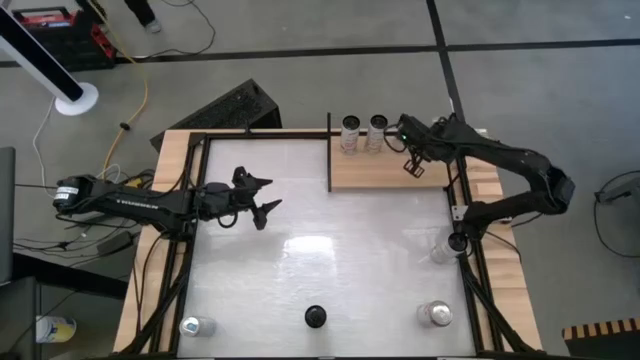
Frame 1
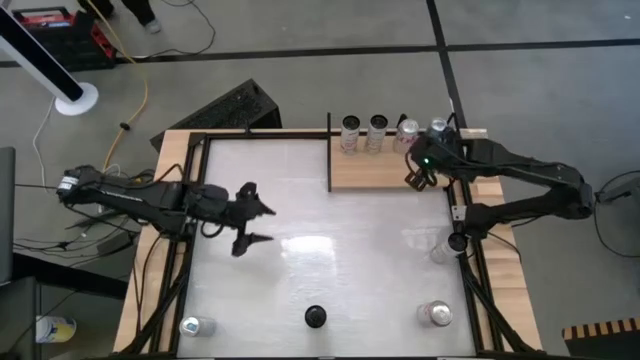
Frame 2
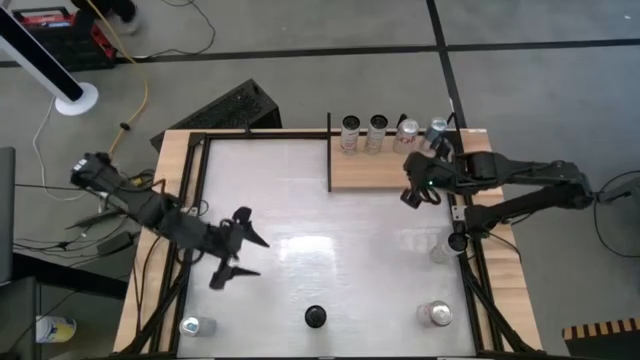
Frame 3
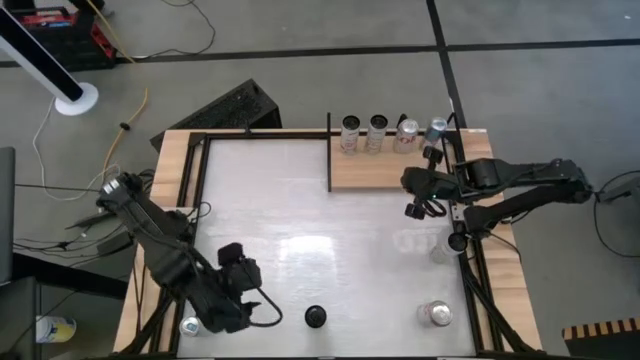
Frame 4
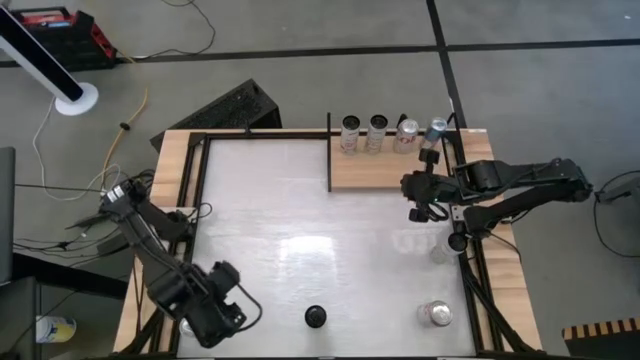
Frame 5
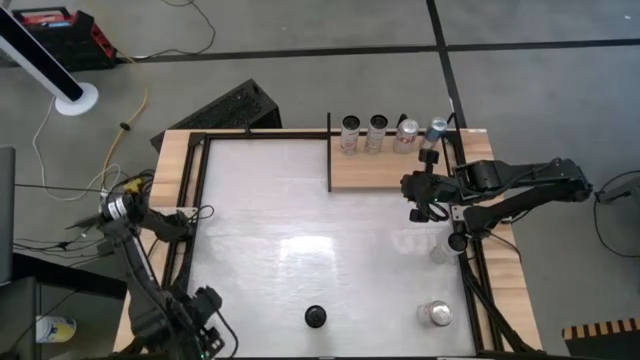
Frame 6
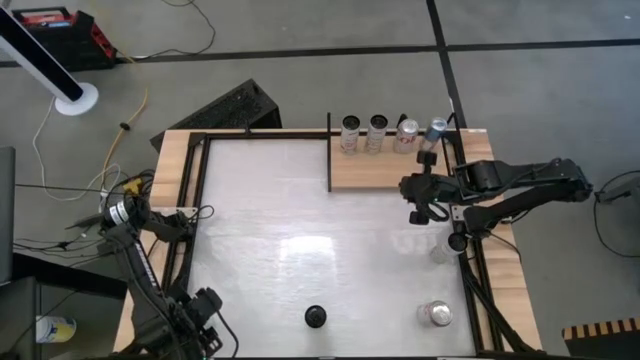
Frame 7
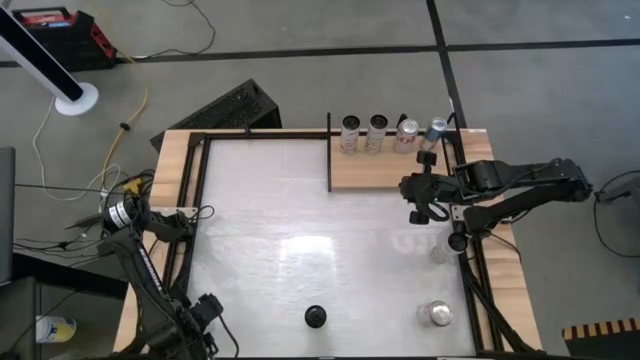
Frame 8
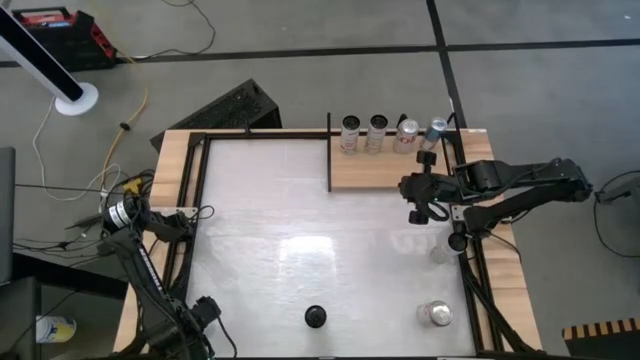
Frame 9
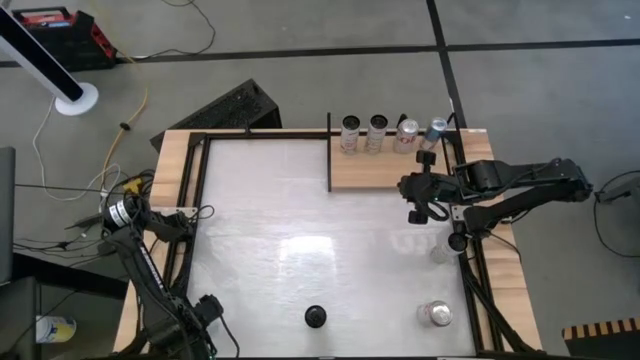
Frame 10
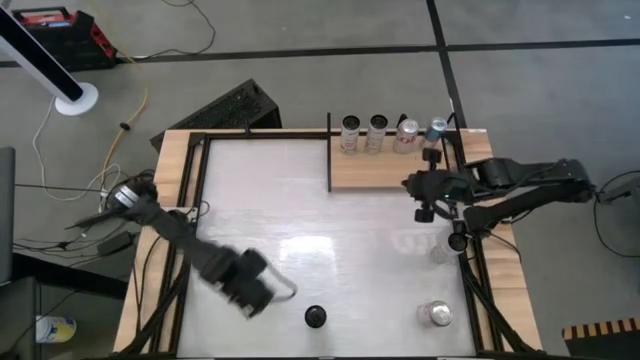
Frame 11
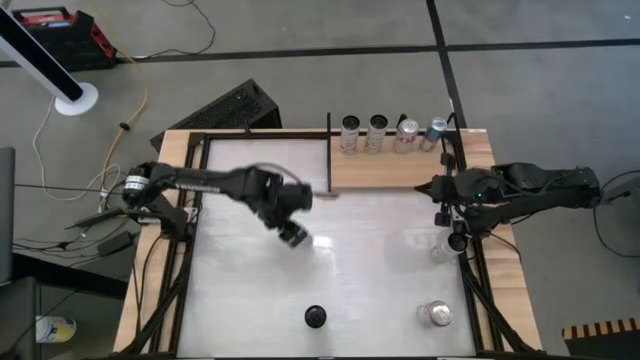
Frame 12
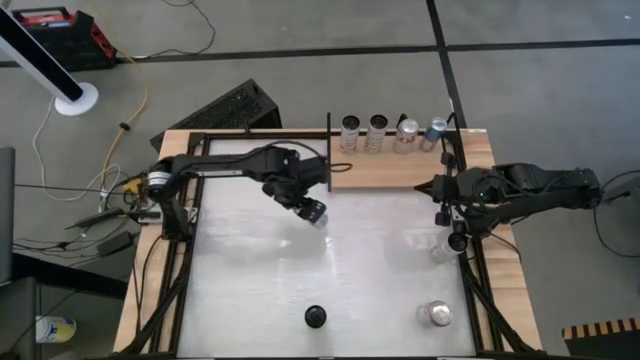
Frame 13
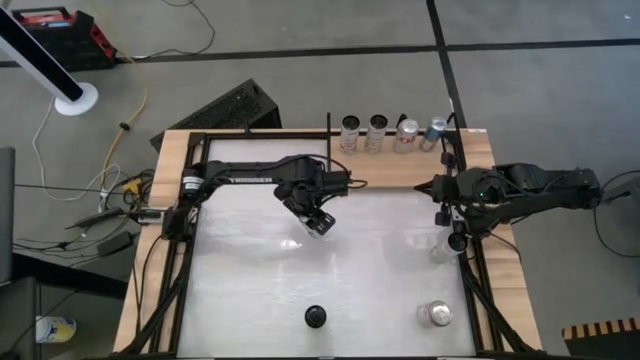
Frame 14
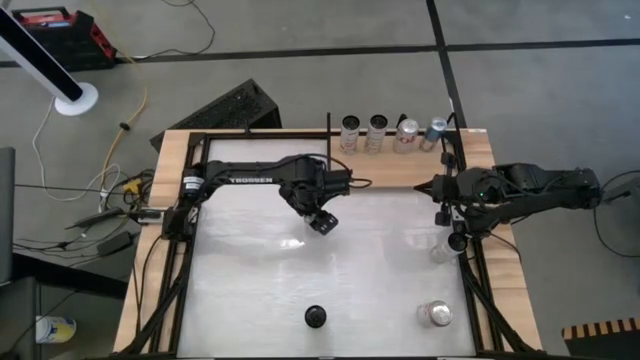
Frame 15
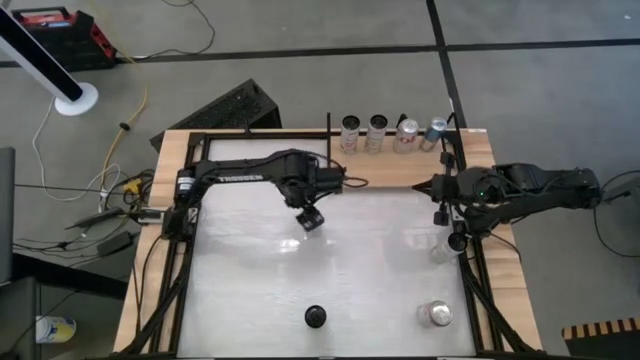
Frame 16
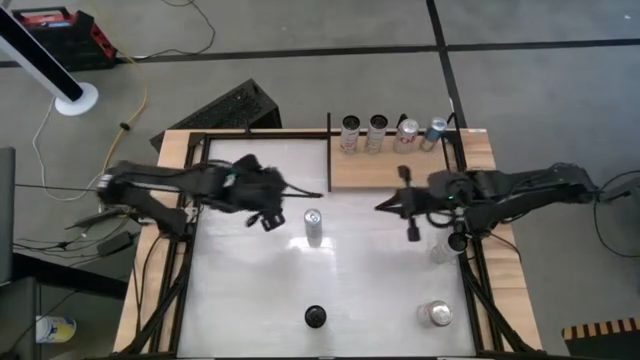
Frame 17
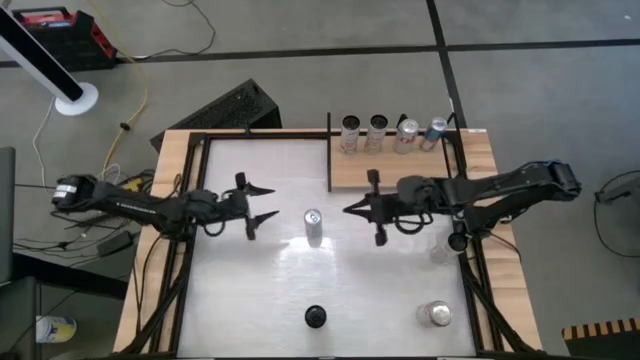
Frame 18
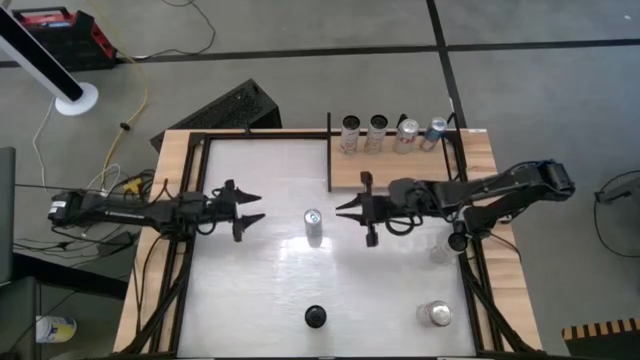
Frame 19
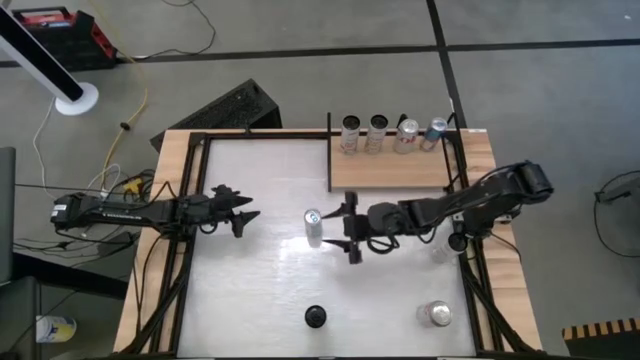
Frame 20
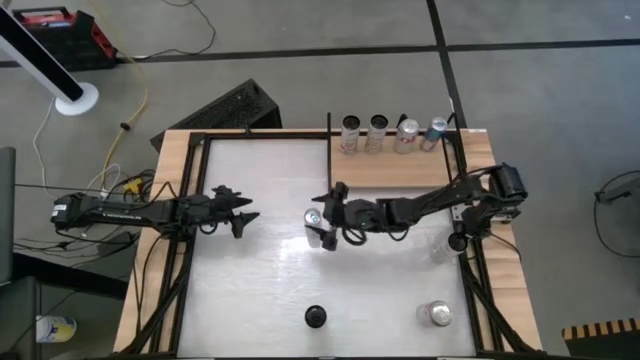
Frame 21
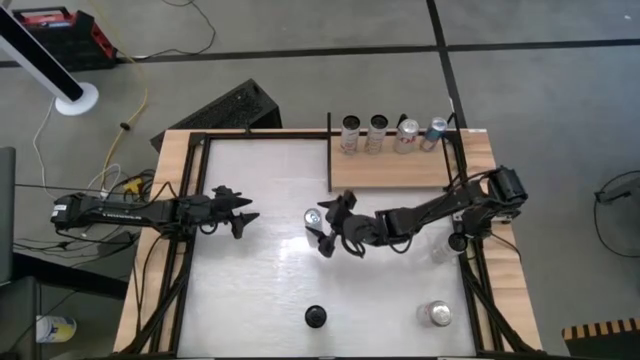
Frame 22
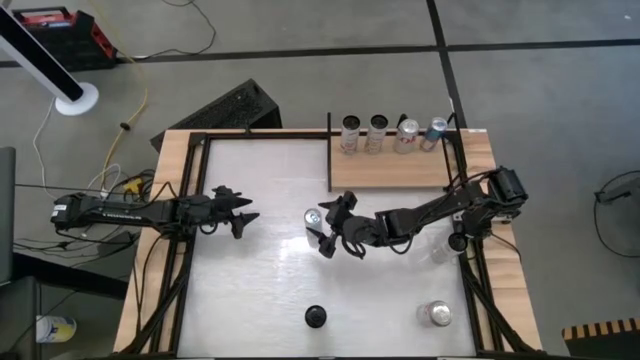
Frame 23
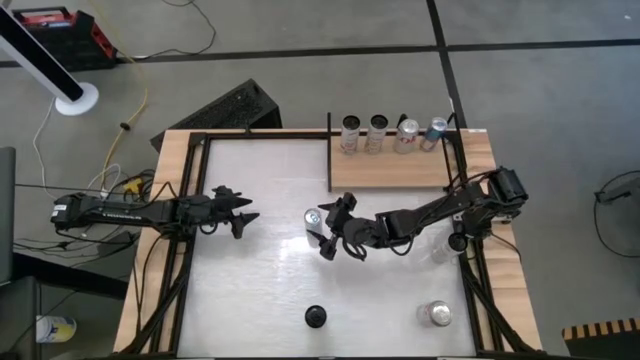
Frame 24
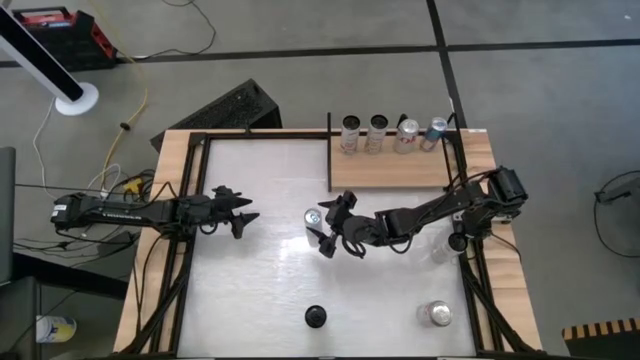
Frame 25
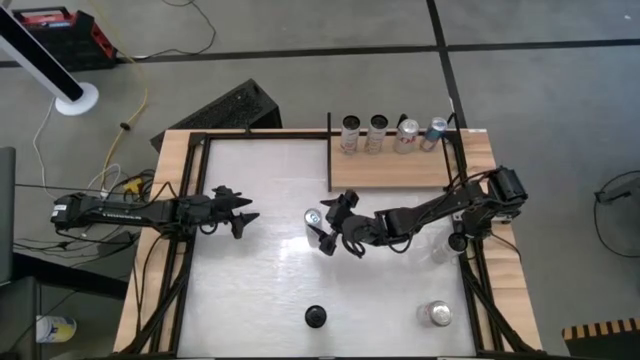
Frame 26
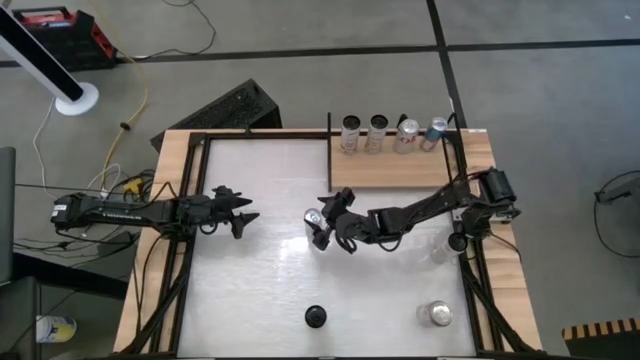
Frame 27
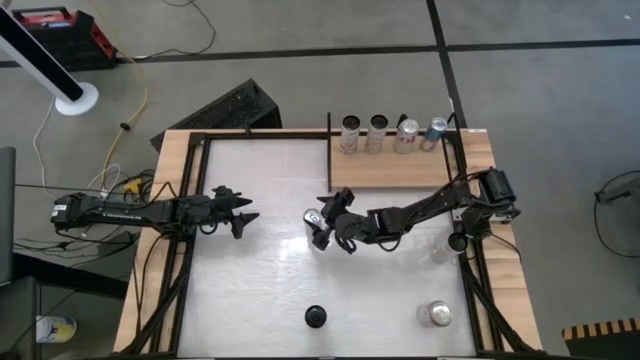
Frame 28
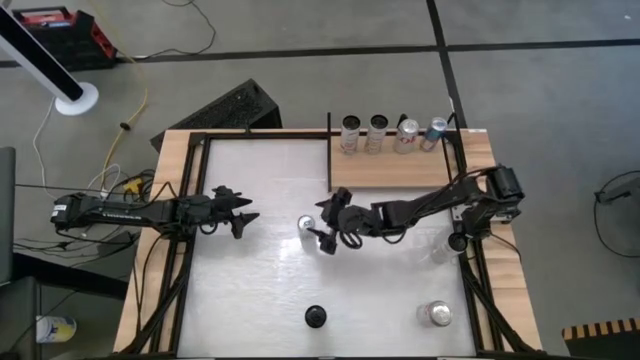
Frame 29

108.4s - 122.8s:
Task: Place canned beverage on shelf
Put the blue soda can on the shelf aligned with the other blue soda can

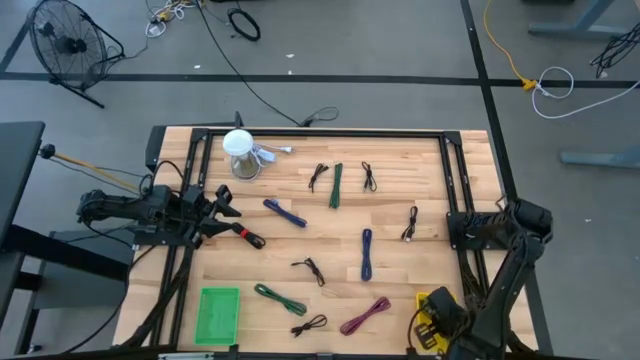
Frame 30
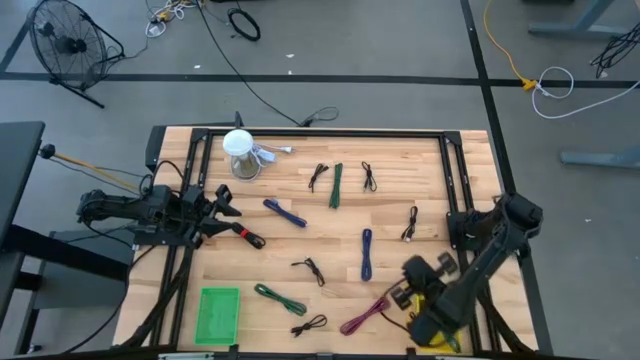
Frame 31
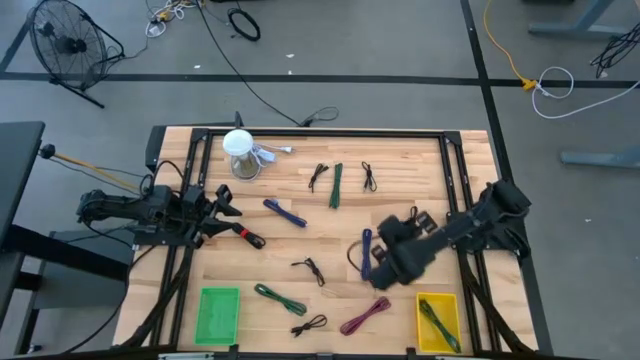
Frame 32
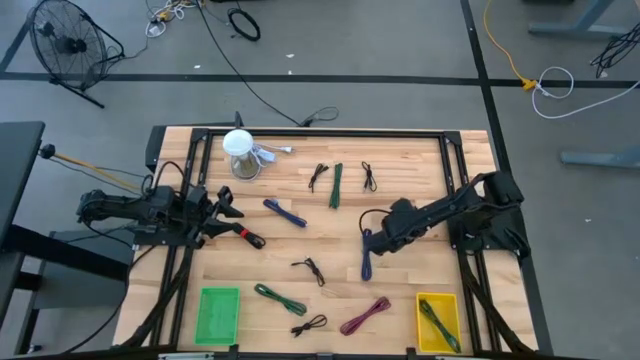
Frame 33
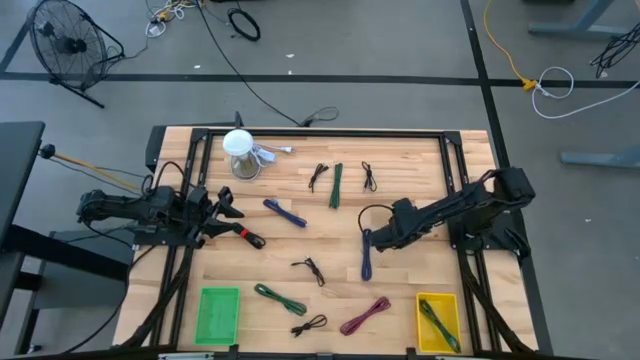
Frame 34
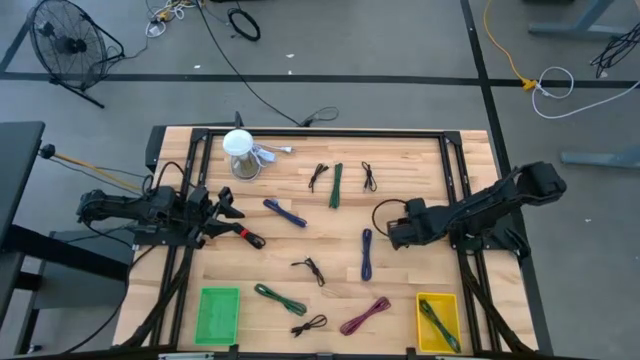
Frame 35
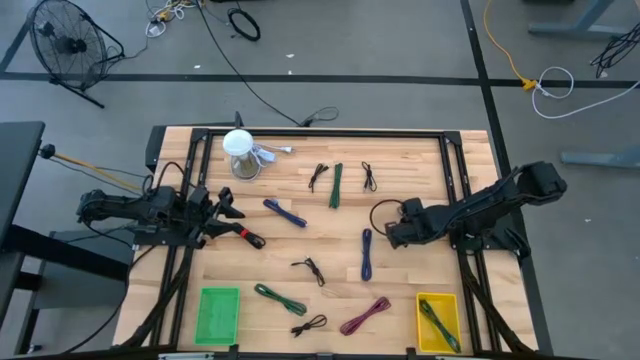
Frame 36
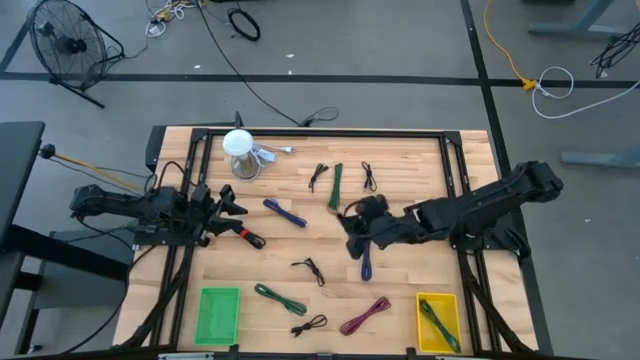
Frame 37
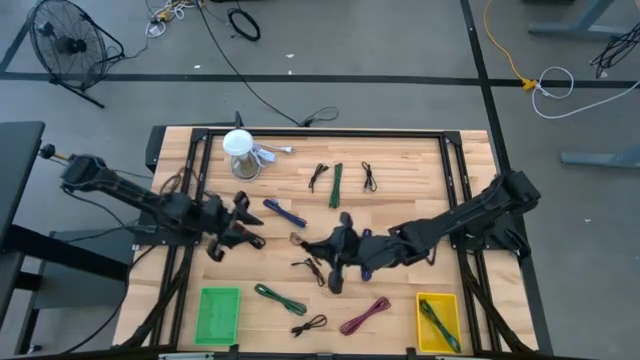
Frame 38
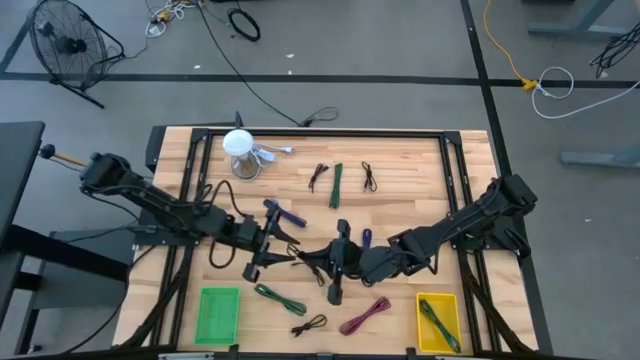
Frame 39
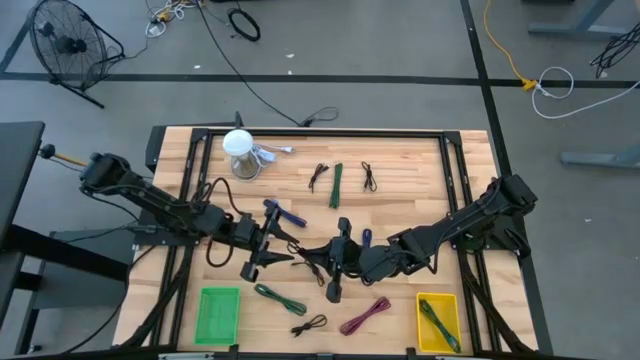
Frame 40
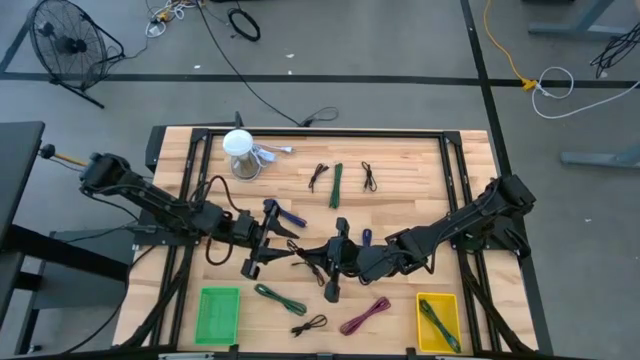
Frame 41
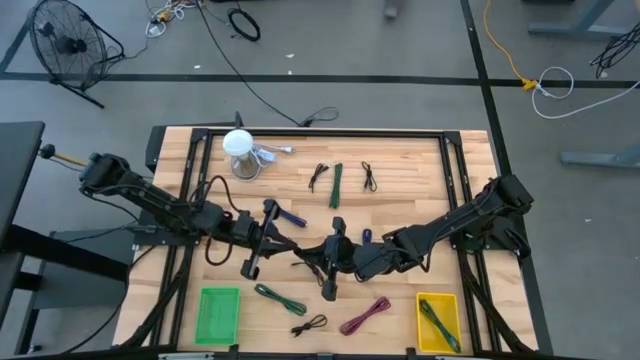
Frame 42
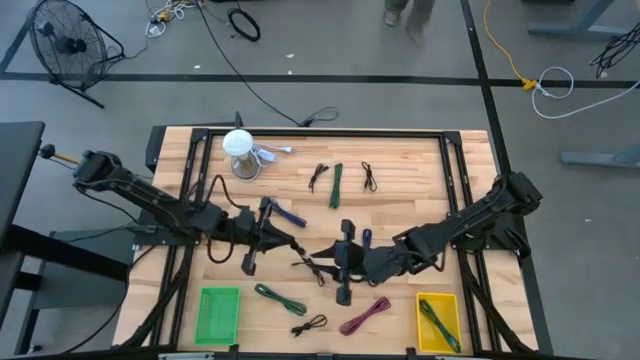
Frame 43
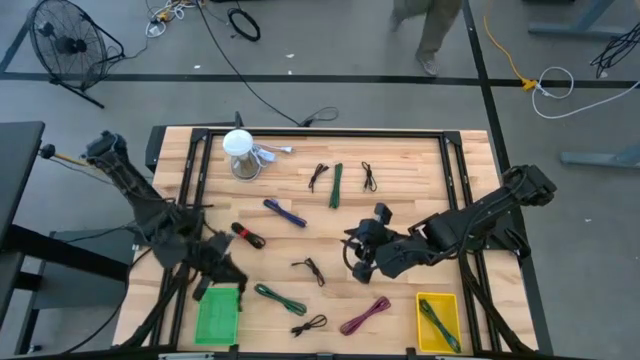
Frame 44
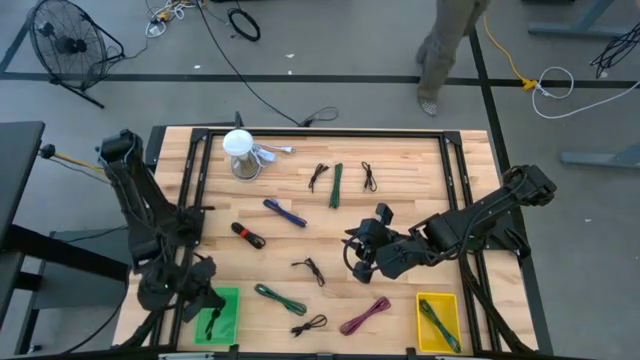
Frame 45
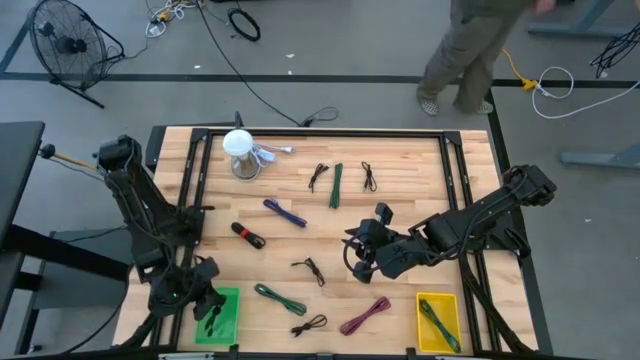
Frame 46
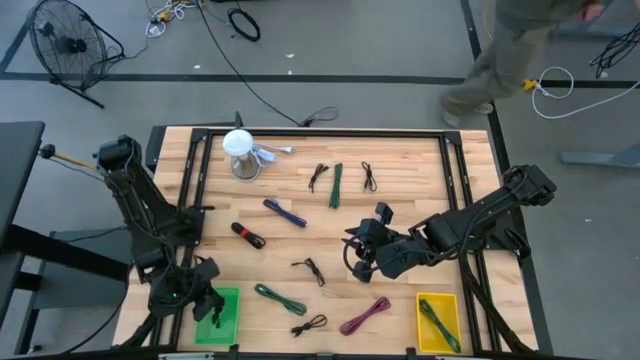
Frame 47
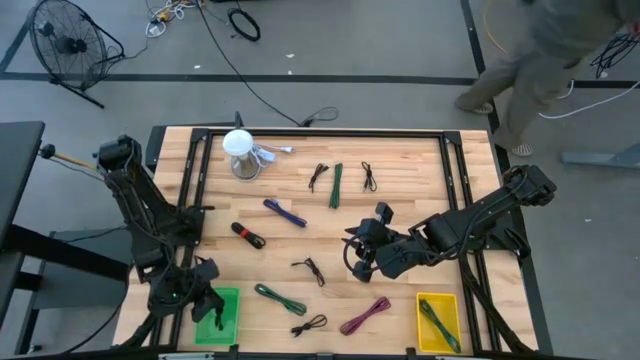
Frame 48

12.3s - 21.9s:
Task: Pick & Place USB Port
Put the black charger cable into the green bin
